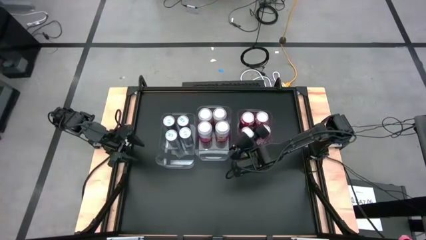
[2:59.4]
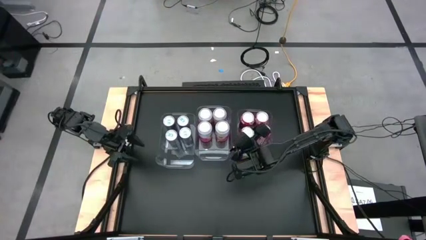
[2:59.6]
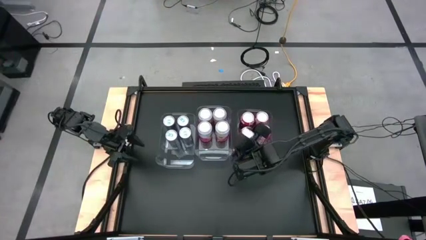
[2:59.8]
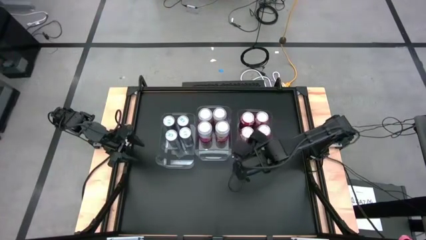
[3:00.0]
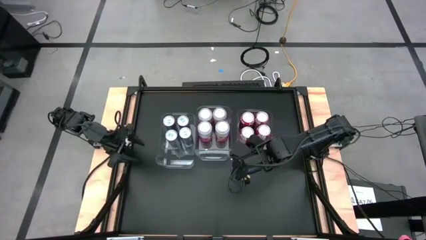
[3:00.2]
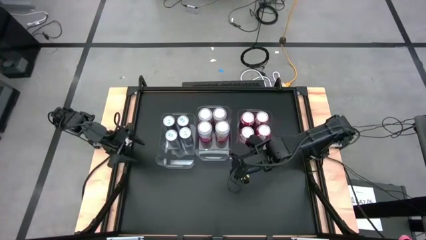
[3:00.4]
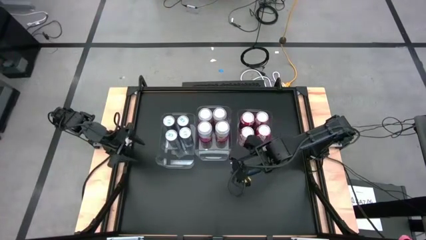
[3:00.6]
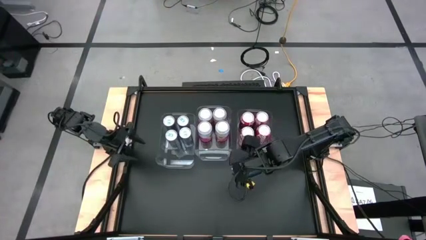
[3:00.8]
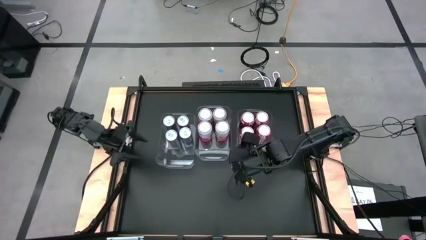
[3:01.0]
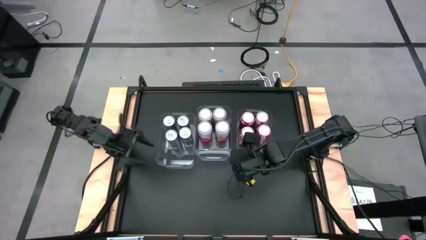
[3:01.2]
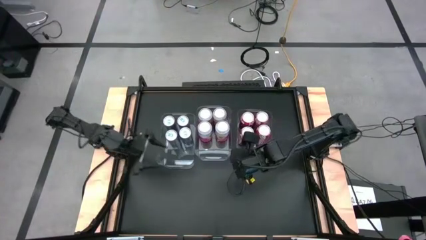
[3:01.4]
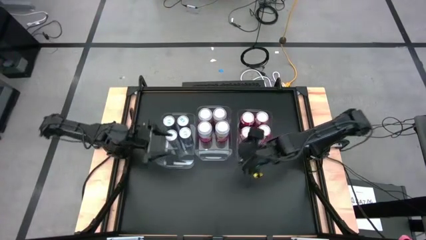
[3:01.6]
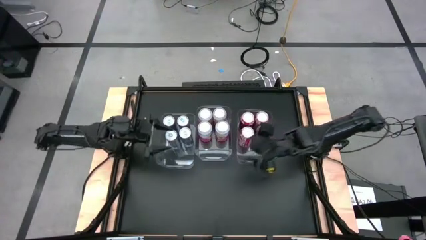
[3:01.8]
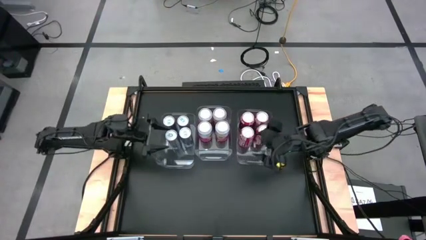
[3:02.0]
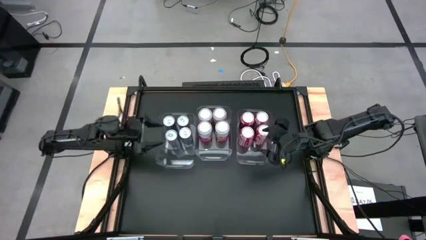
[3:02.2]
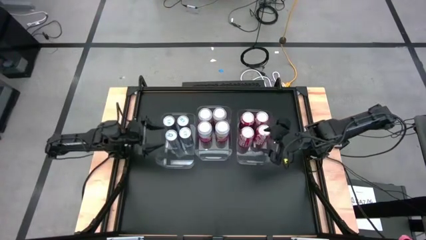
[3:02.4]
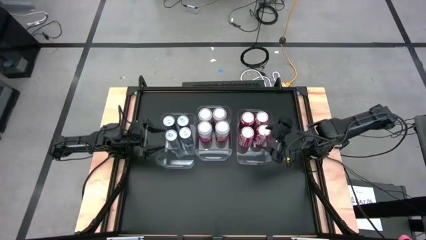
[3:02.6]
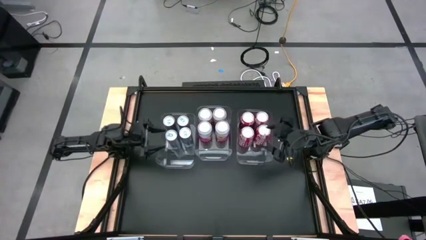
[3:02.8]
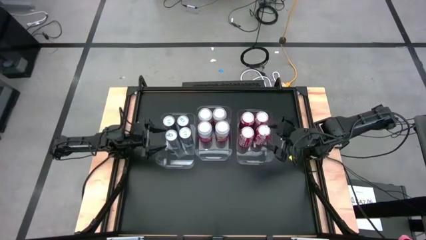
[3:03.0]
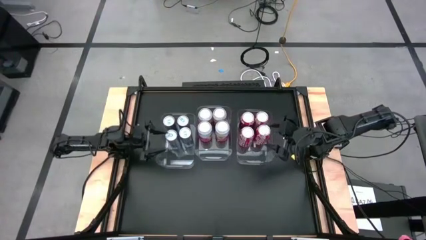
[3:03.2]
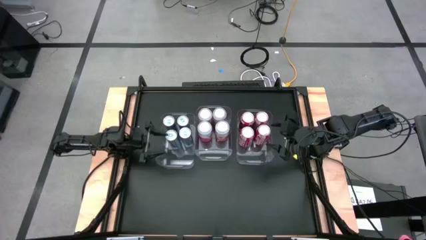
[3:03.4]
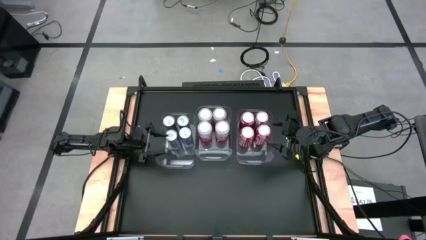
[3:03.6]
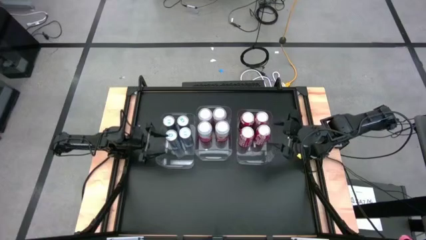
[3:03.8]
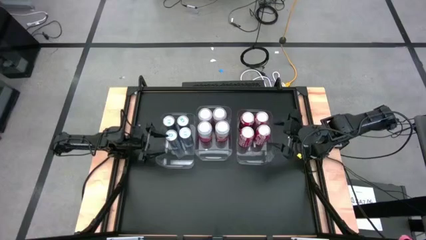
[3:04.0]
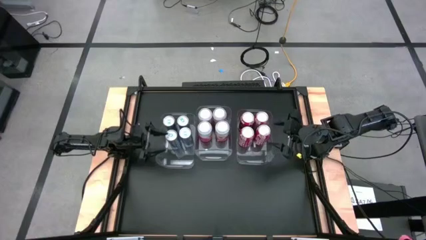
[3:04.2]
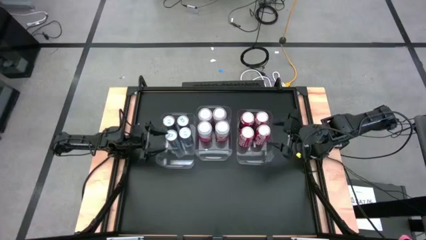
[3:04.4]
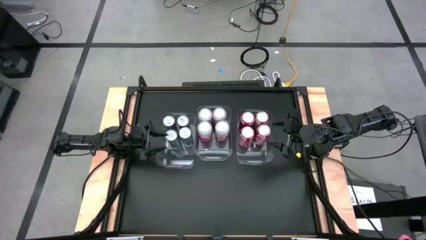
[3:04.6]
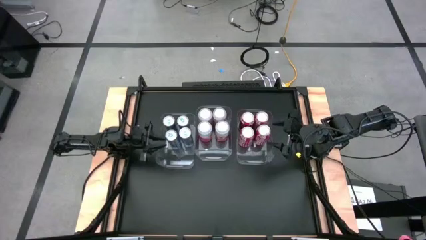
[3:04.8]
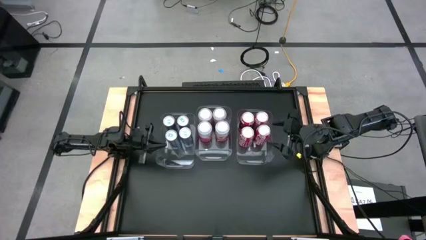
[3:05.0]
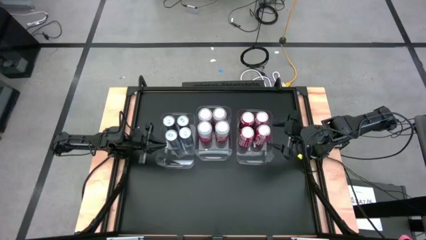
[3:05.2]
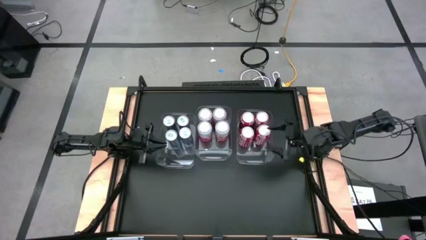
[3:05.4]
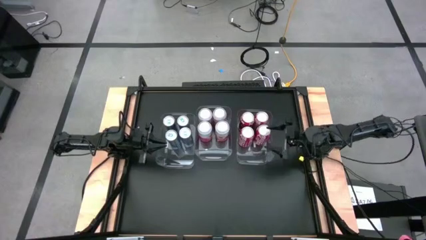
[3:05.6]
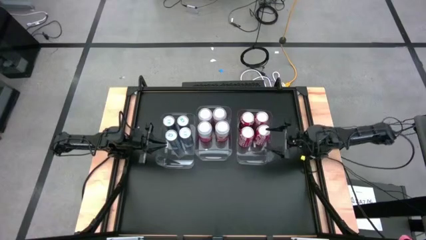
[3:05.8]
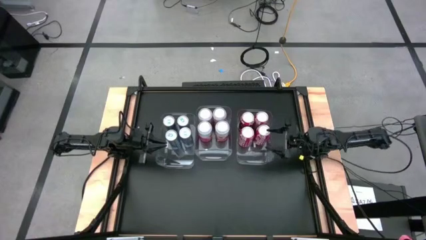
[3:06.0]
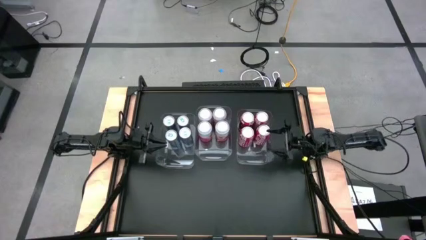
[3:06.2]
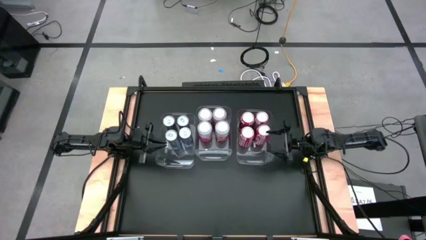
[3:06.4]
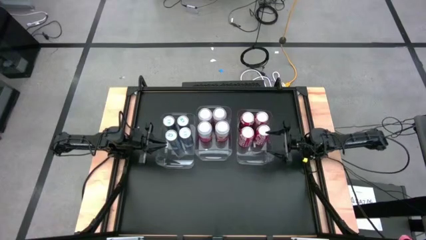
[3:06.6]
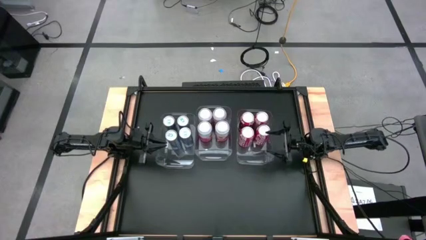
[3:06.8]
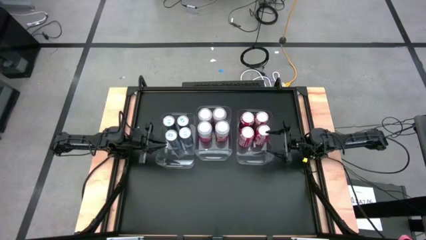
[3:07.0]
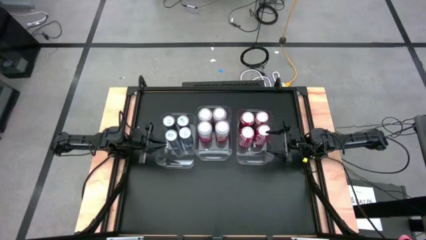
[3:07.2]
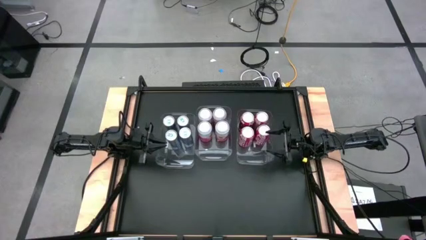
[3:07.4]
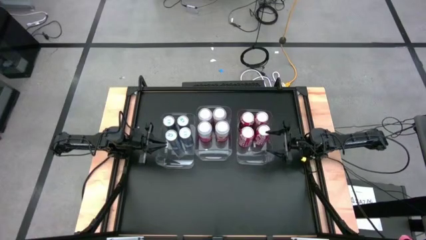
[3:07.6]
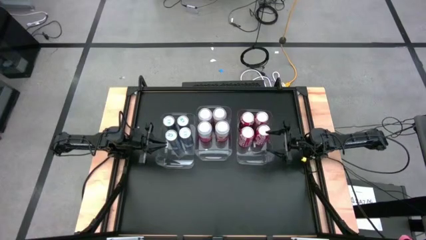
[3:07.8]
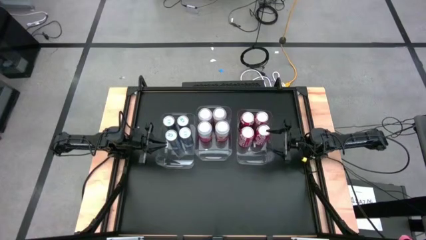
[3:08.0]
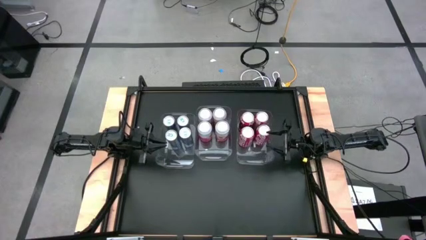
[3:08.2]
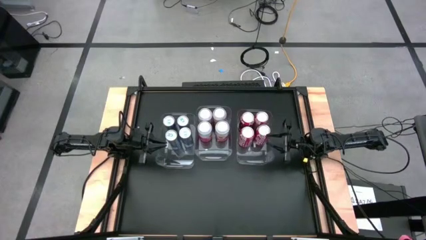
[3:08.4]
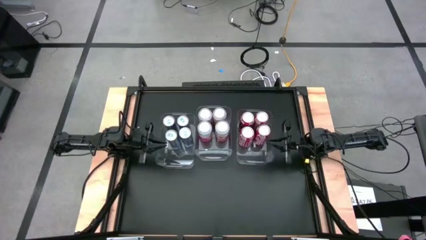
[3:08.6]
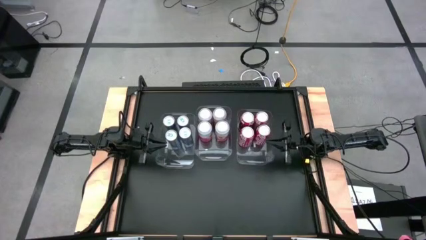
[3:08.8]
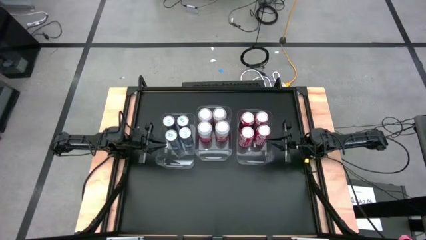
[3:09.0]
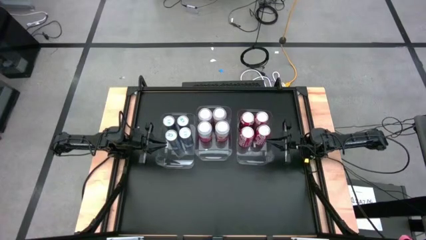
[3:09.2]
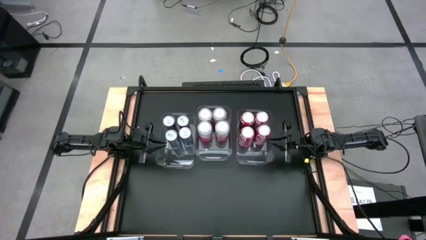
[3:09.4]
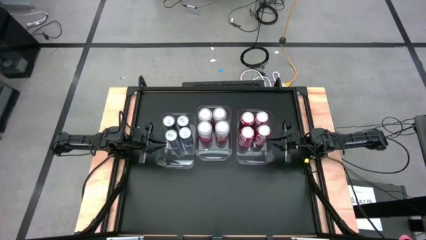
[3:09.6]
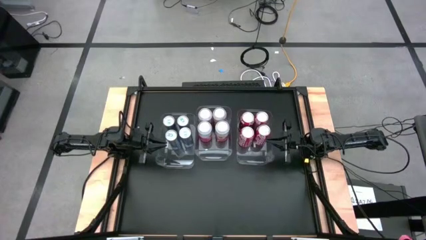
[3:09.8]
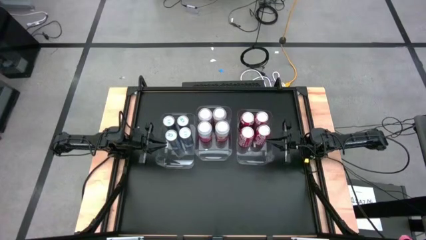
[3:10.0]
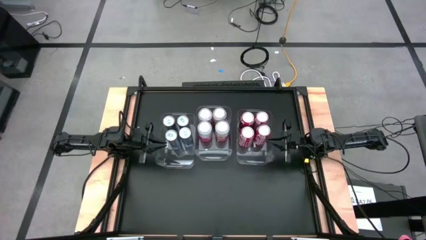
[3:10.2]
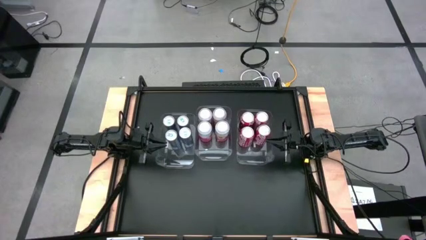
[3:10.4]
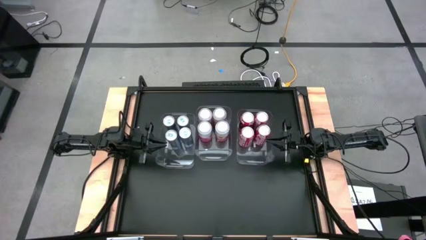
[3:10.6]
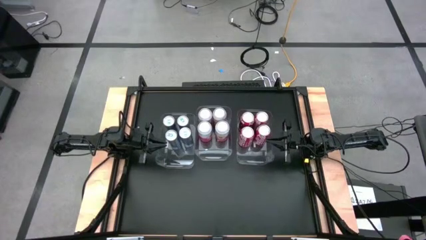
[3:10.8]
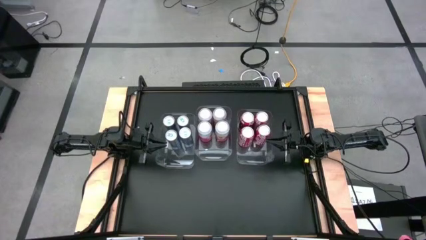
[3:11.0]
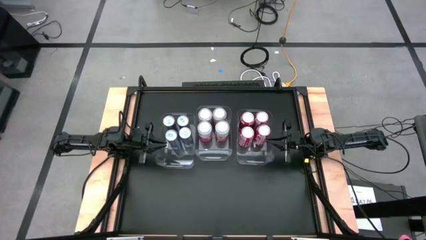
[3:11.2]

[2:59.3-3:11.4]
Task: Sort soda cans
Return to Home Position

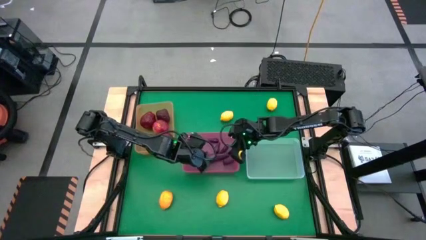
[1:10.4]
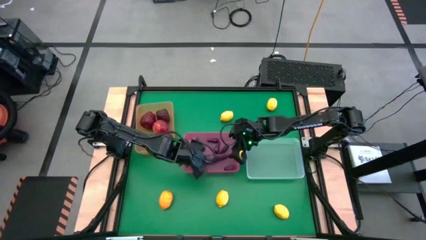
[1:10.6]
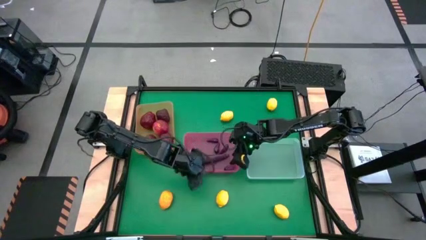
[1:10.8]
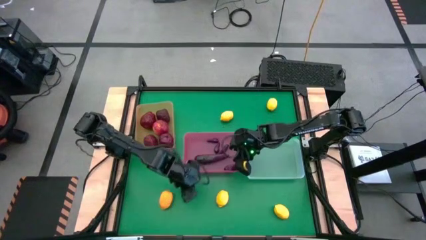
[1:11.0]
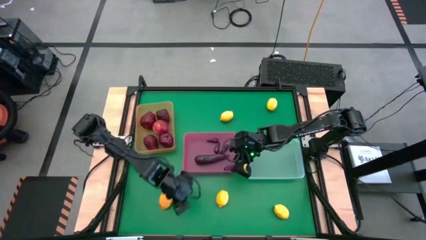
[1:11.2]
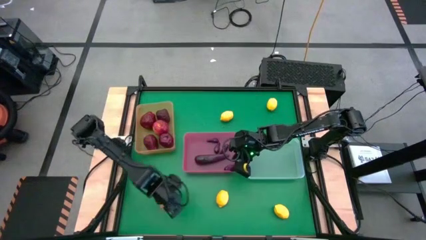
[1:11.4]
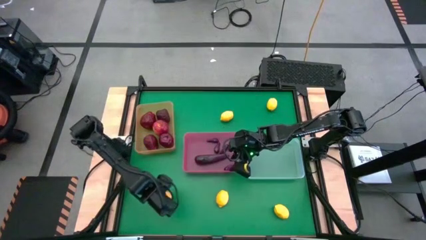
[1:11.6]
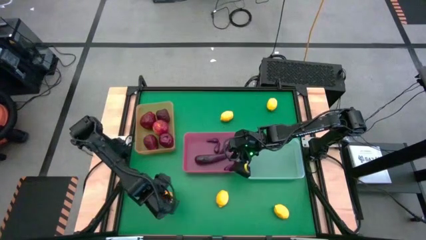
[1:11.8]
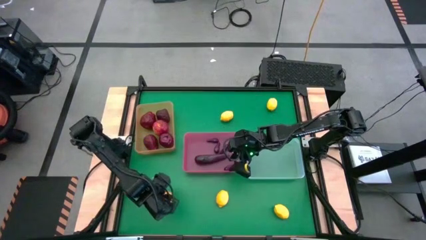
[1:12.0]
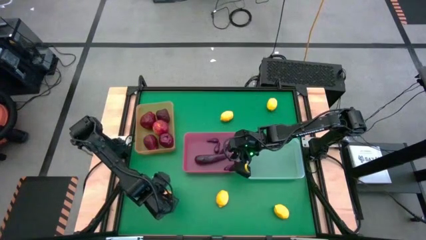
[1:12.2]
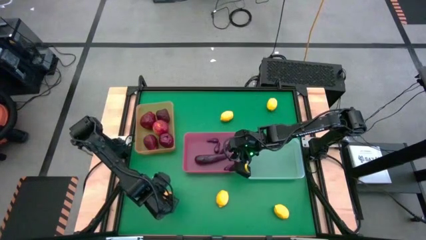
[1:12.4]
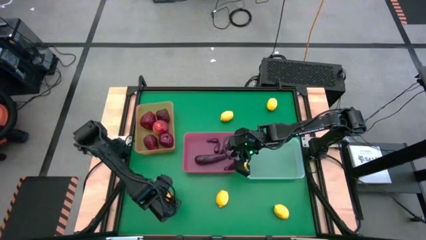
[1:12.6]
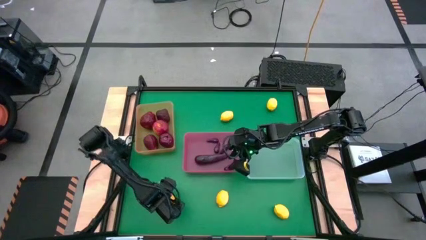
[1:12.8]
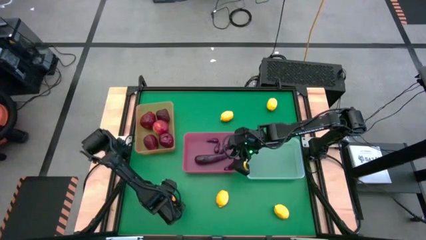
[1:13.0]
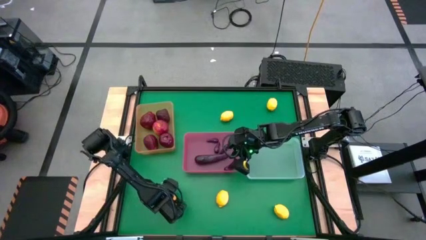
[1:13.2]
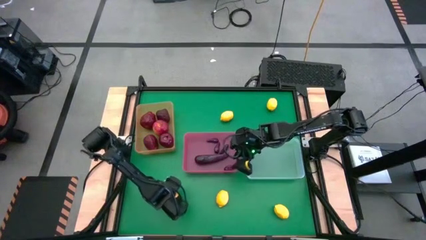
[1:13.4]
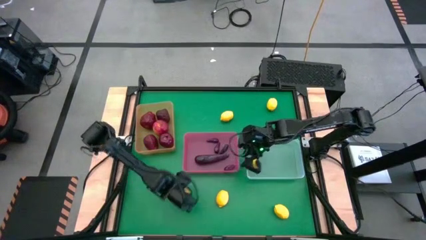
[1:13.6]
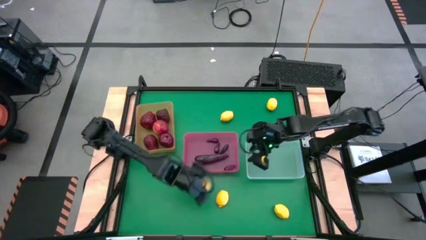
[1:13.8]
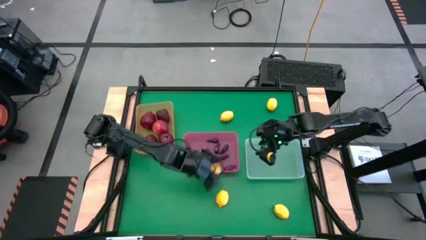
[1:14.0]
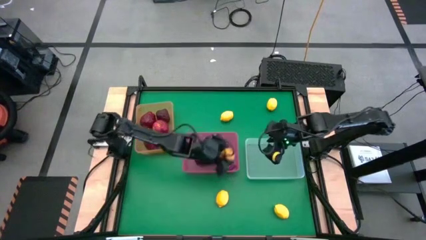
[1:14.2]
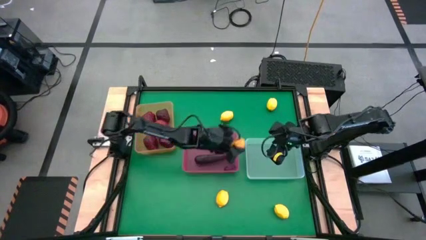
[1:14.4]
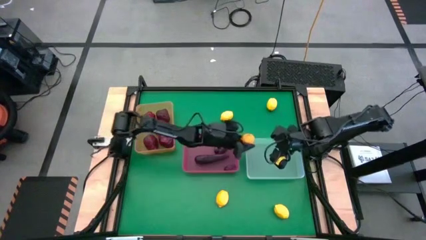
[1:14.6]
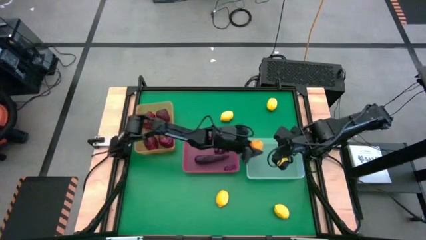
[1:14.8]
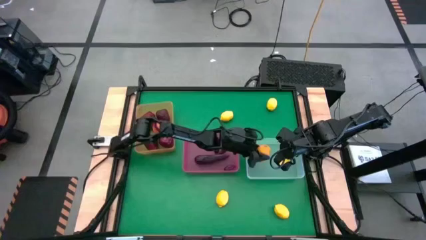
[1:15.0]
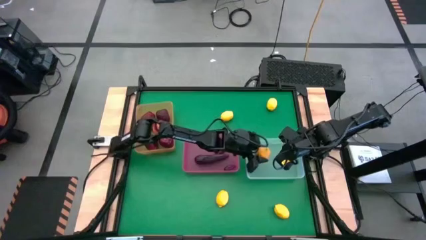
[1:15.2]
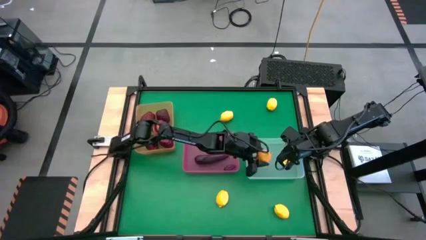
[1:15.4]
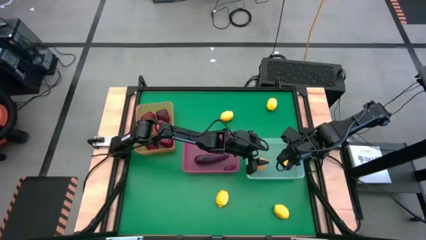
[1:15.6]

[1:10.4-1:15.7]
Task: Sort produce into baskets
Put the yellow lemon into the transparent bin
